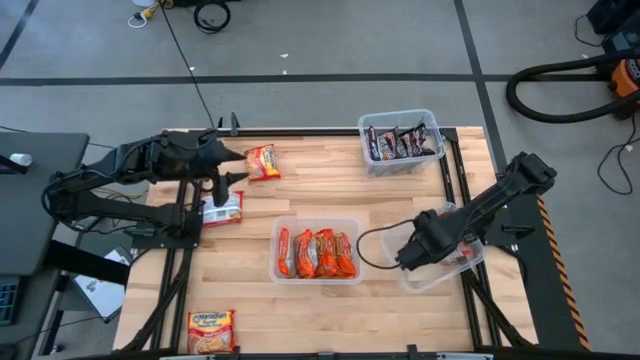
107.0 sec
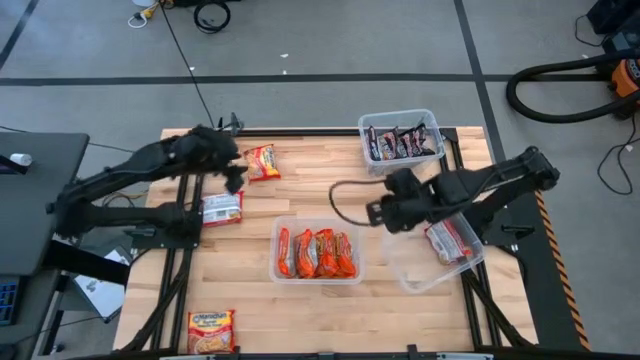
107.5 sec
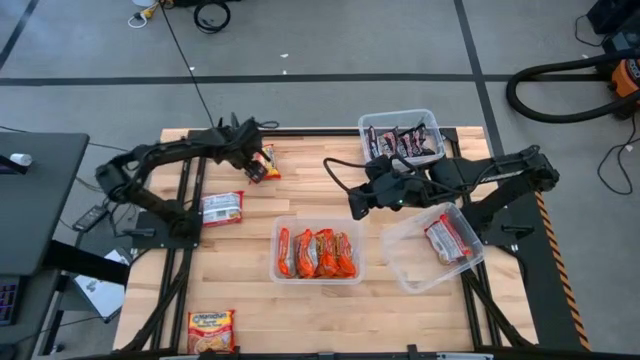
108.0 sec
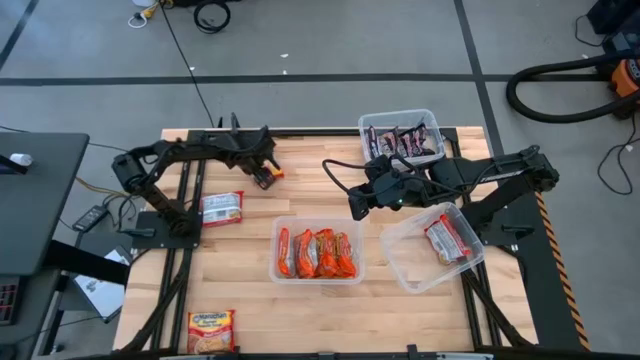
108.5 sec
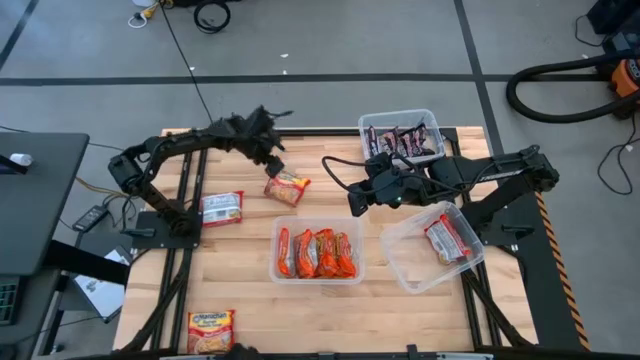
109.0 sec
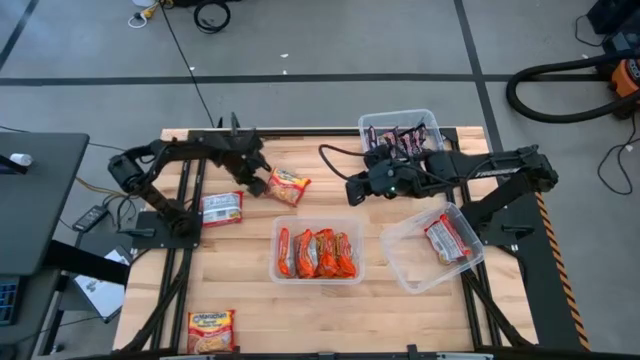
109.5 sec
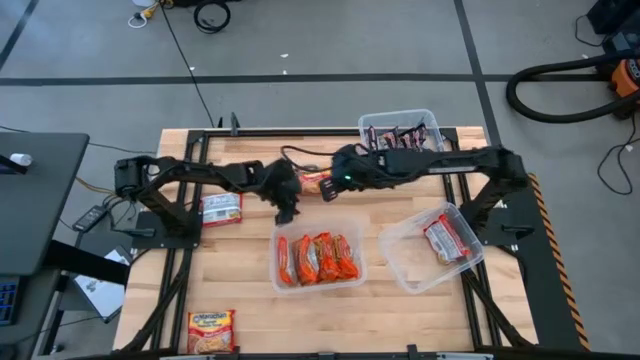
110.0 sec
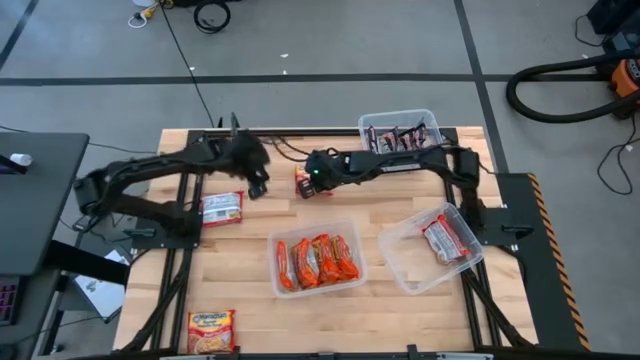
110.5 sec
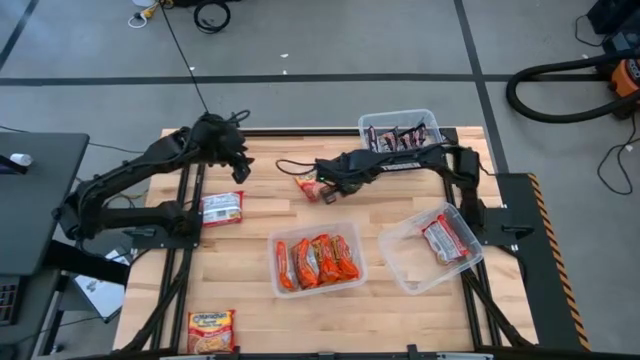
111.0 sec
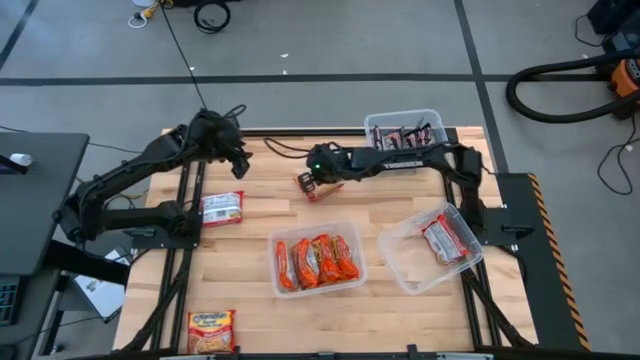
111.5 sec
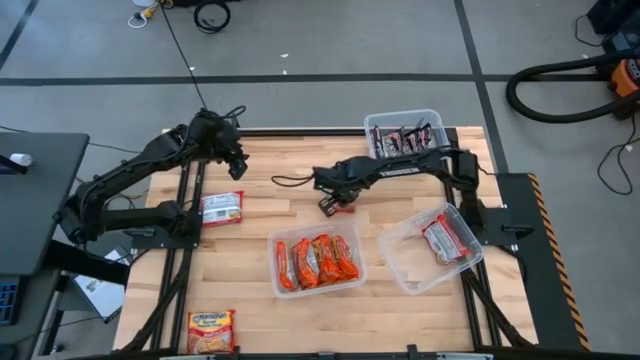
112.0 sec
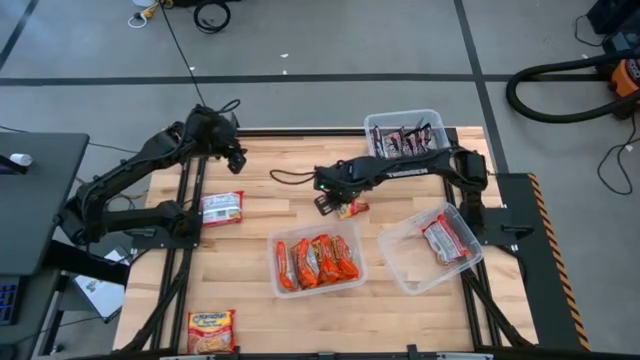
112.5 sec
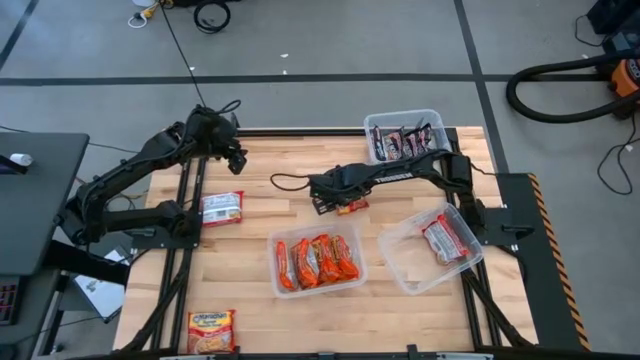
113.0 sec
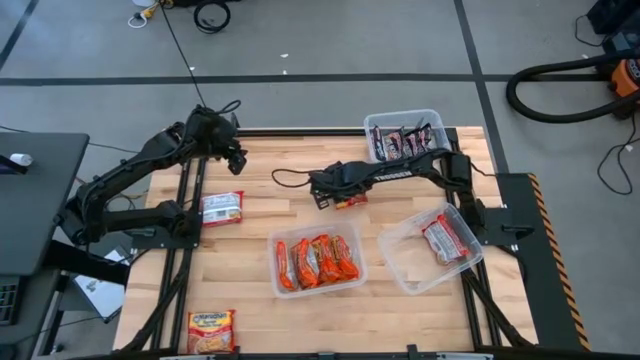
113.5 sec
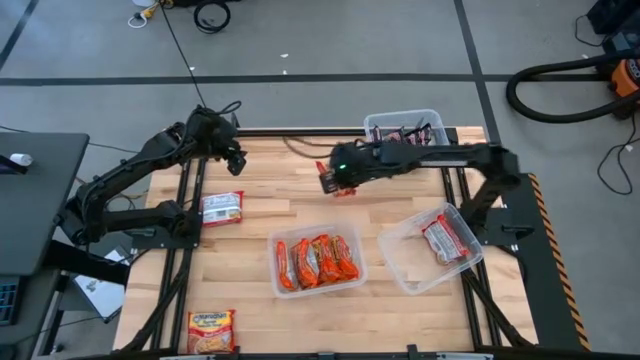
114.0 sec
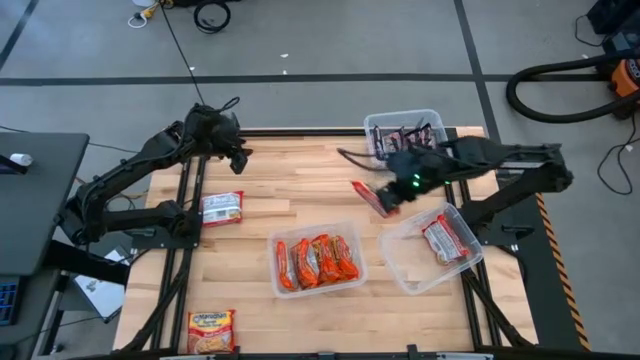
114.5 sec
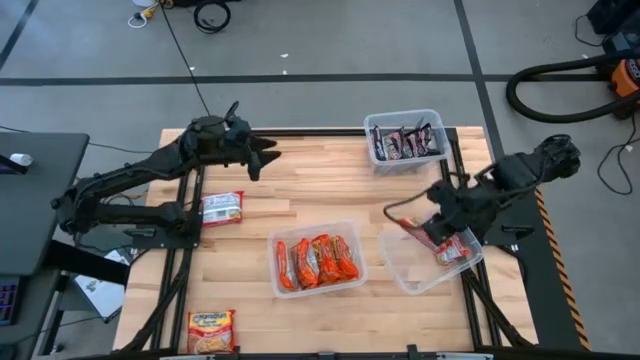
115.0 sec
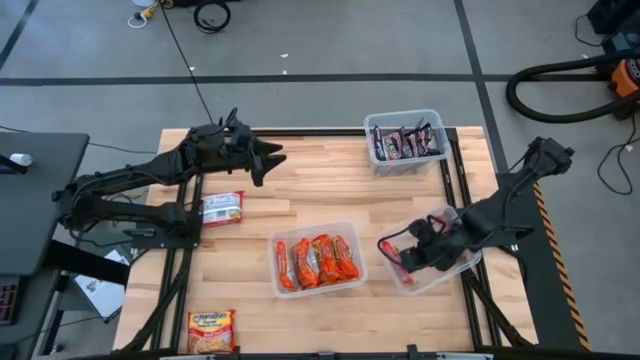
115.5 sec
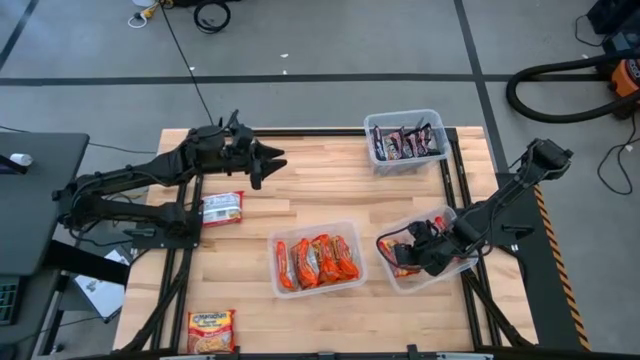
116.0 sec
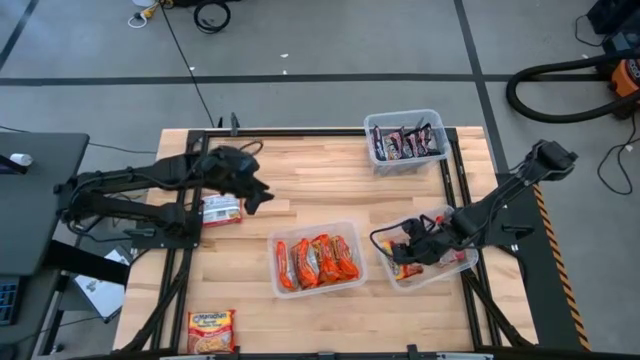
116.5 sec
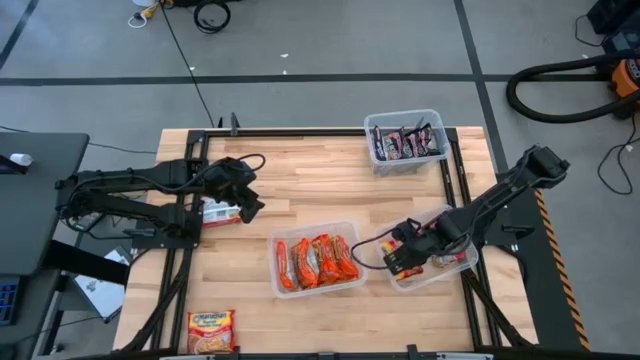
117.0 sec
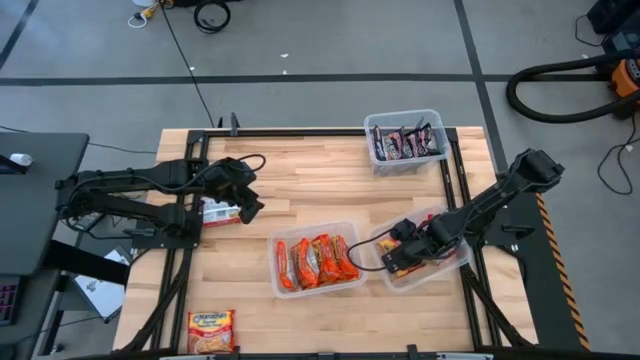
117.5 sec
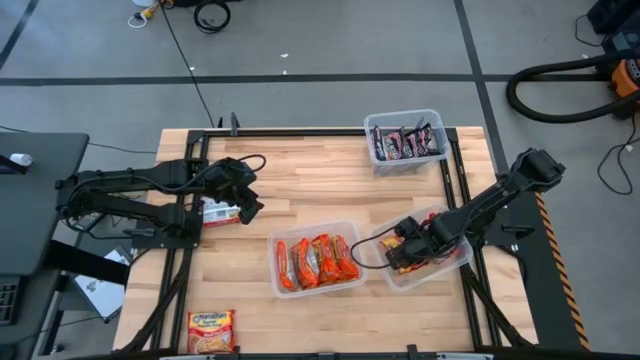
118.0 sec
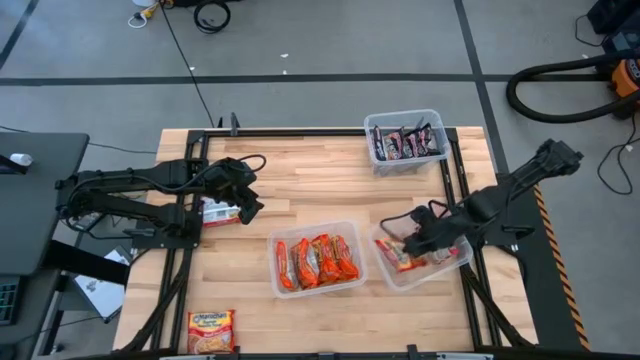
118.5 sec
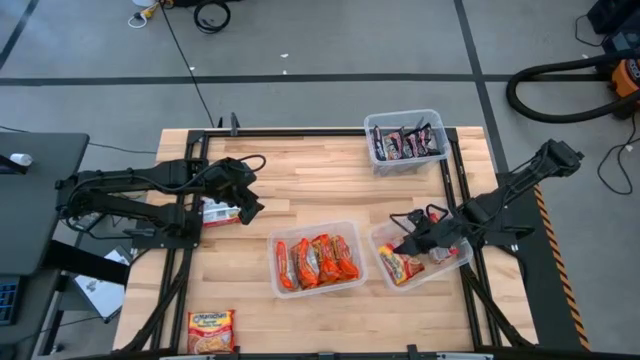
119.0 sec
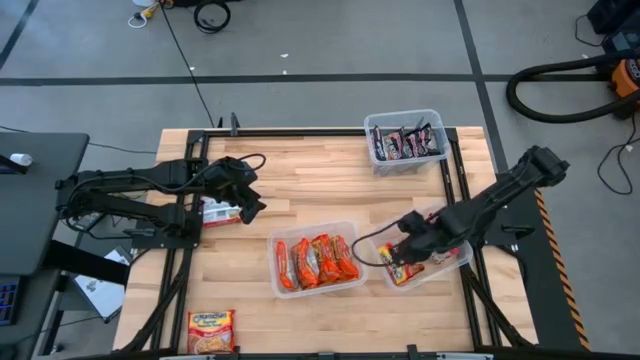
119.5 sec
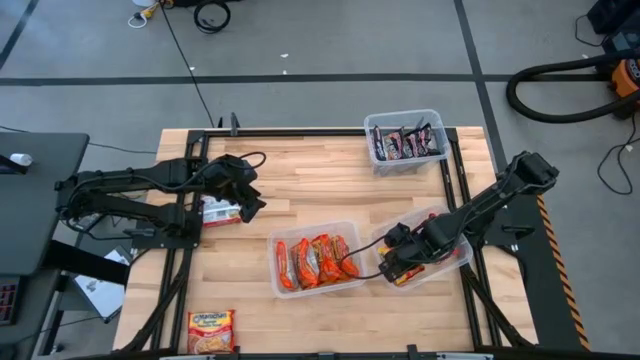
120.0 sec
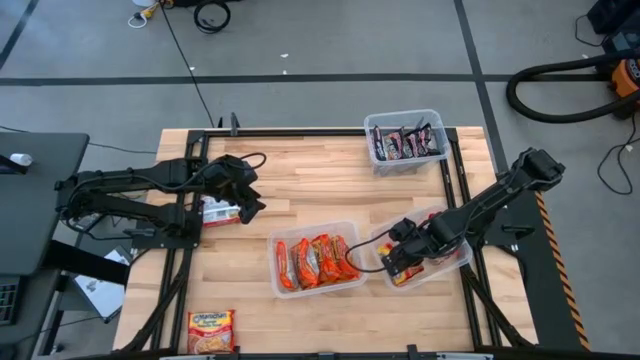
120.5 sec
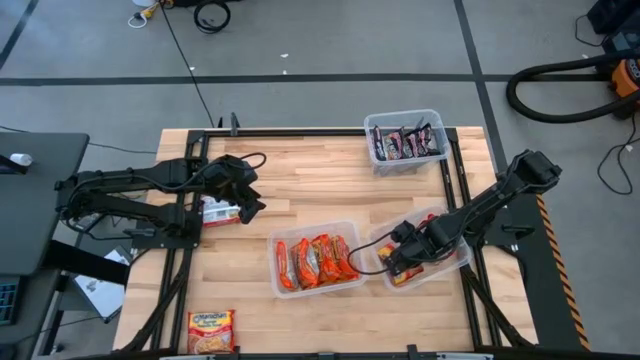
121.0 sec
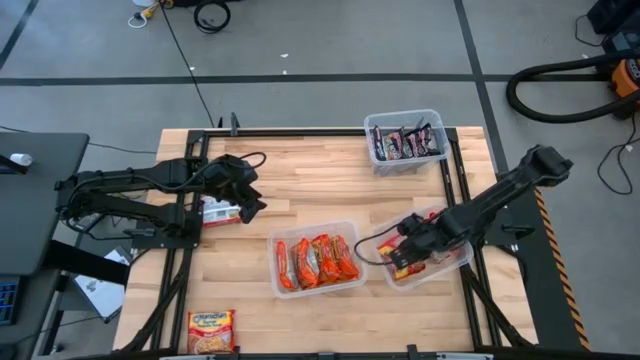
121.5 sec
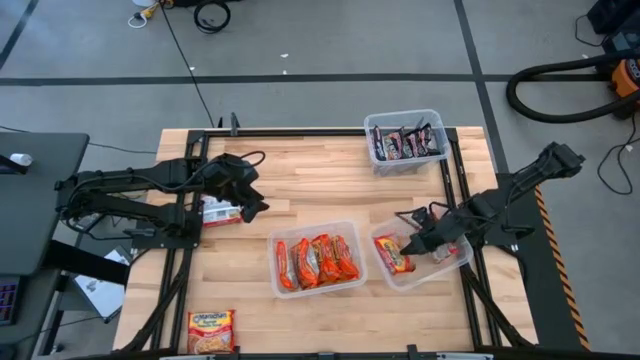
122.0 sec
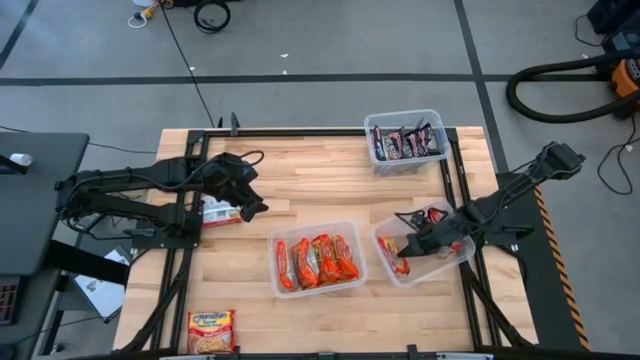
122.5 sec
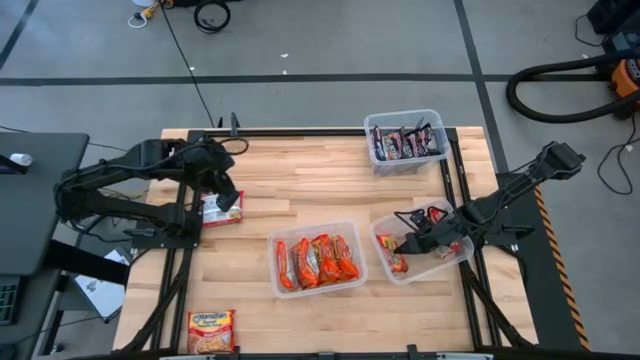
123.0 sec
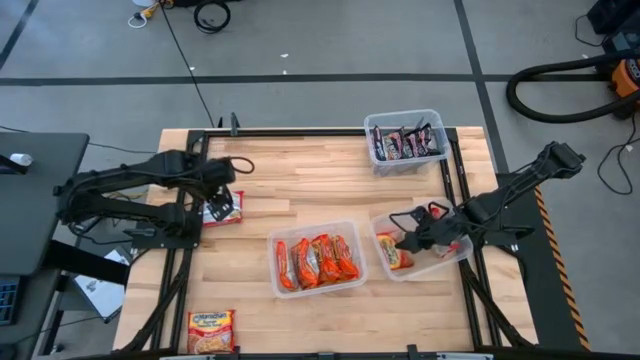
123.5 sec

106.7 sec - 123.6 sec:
Task: Sort Maruchan noodles
Put the red noodle pack into the bottom right transparent bin

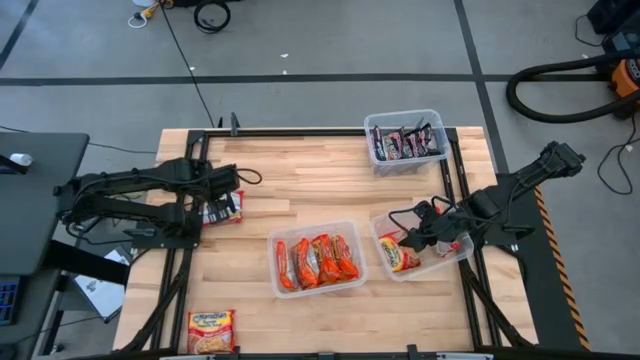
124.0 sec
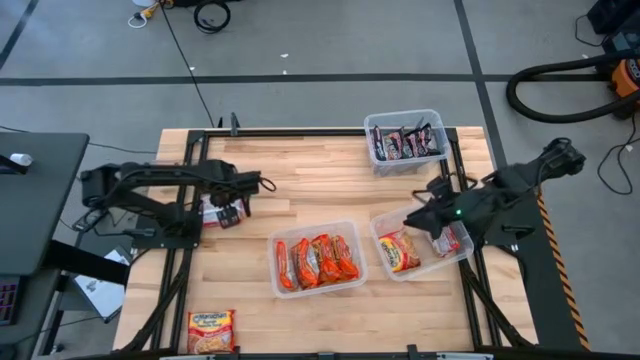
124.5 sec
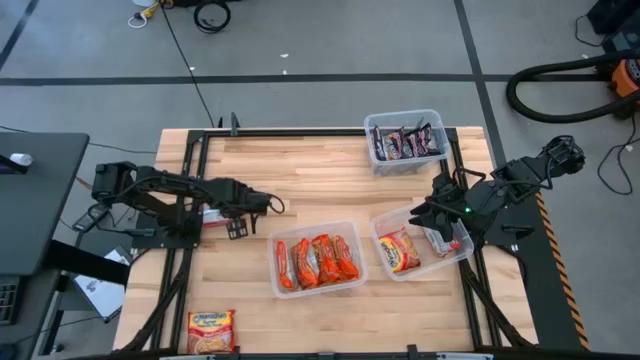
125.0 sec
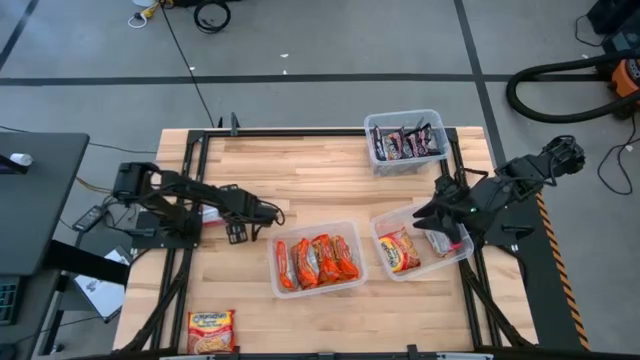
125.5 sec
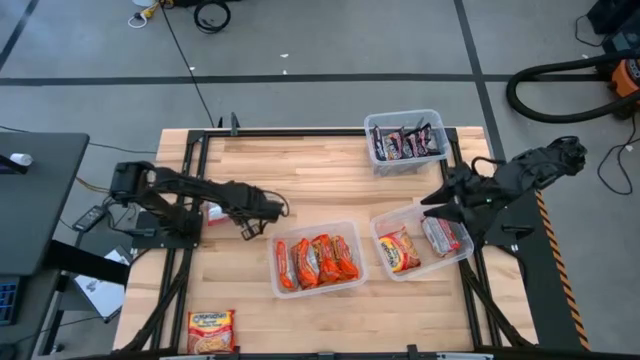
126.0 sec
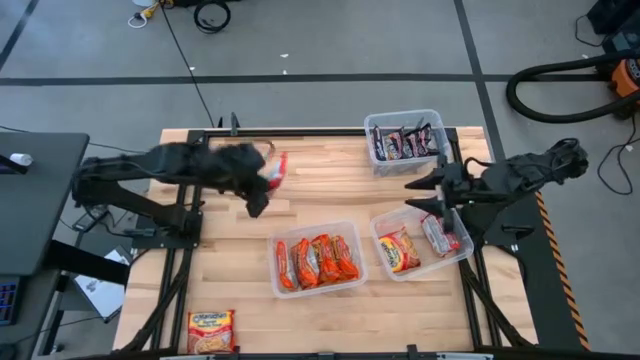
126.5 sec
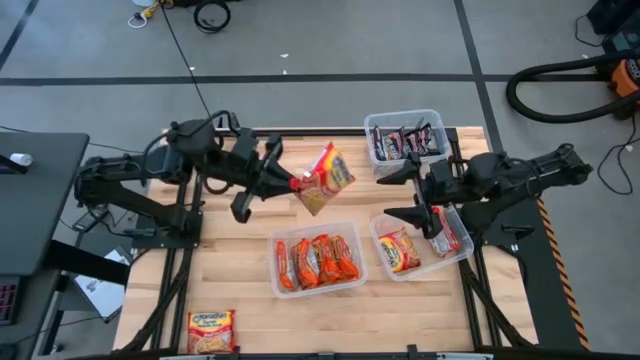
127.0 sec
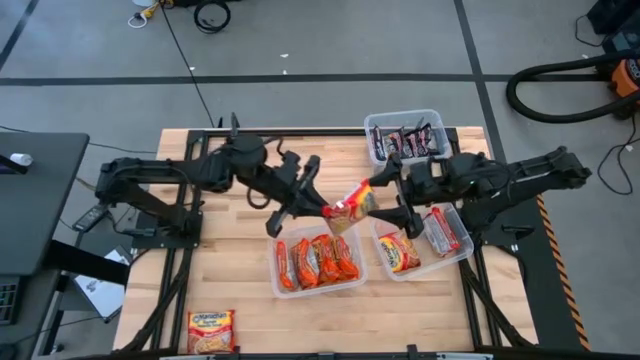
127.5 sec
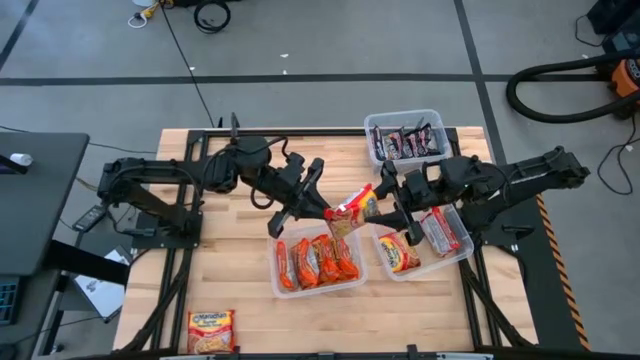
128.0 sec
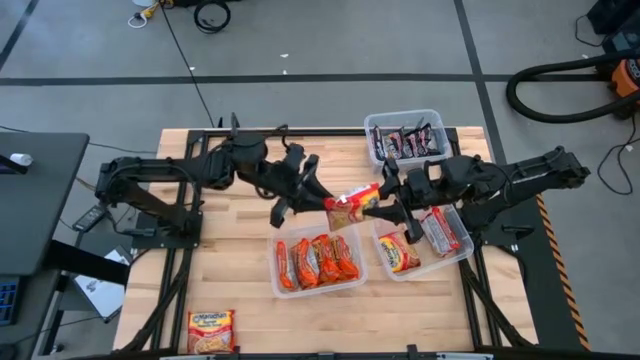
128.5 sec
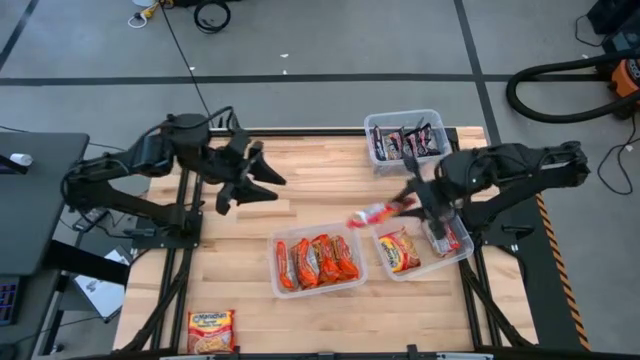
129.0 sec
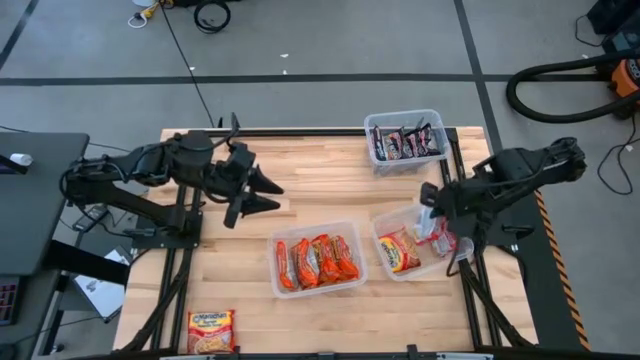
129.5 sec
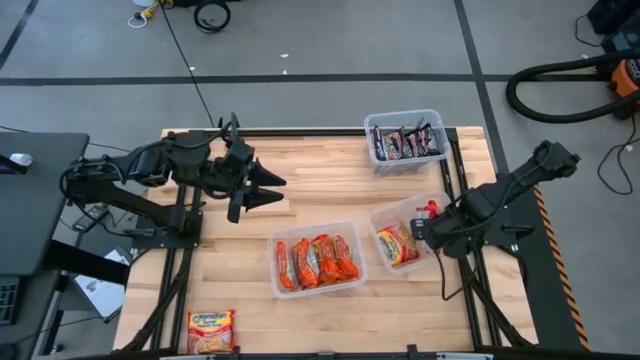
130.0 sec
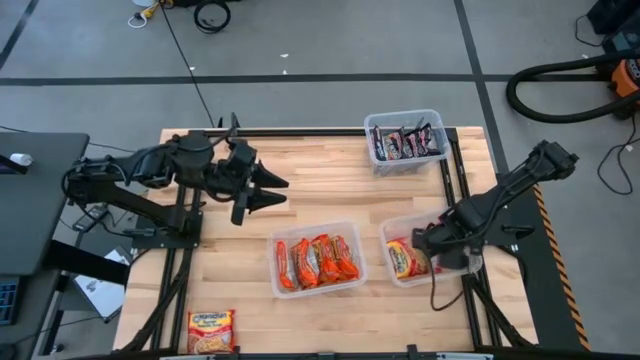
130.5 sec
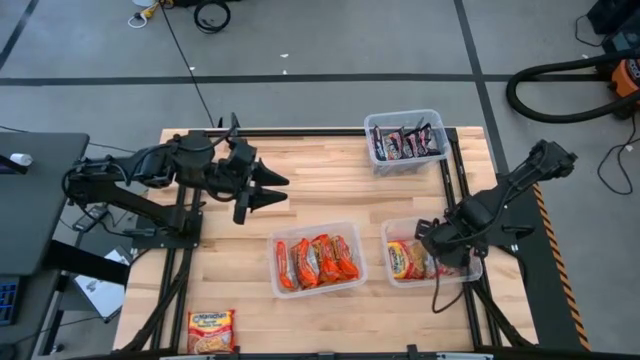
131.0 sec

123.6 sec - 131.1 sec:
Put the red noodle pack into the bottom right transparent bin
